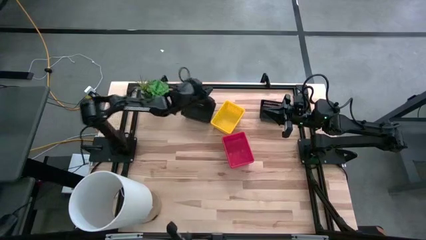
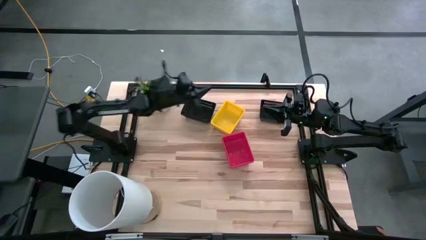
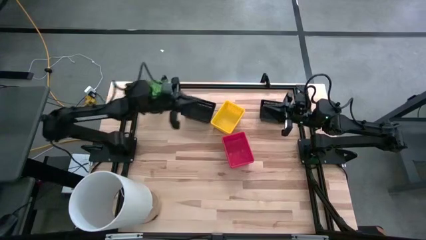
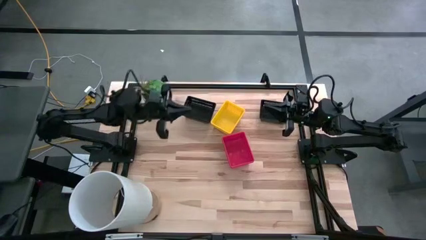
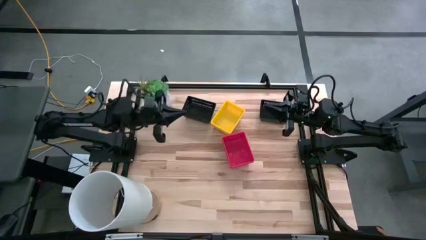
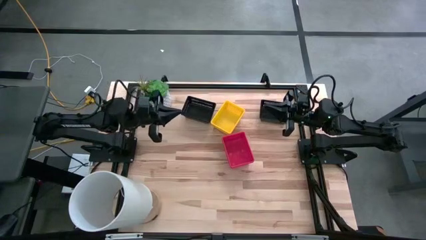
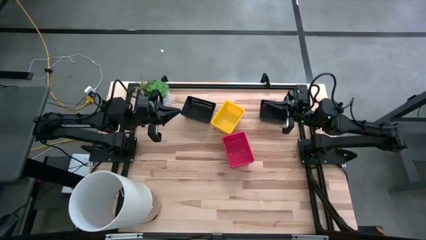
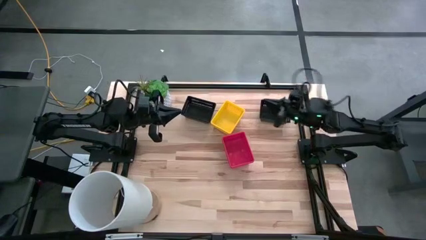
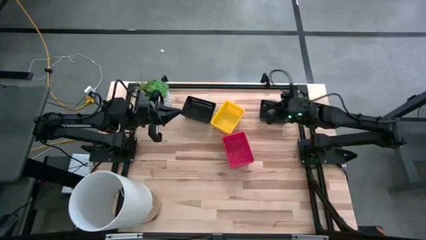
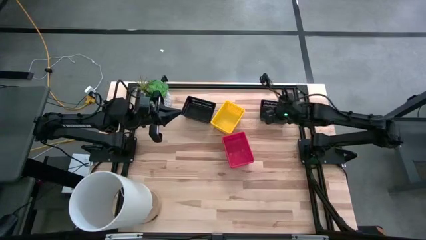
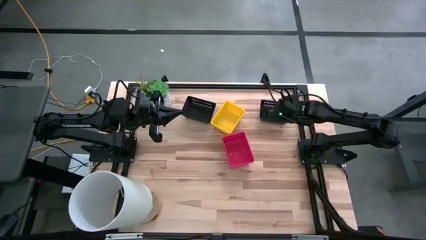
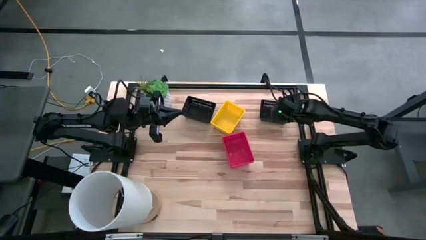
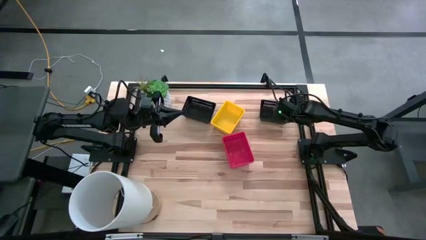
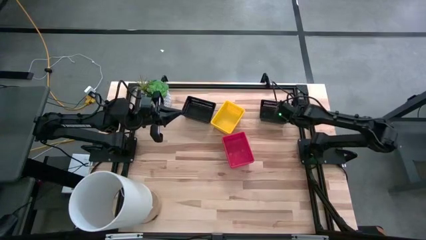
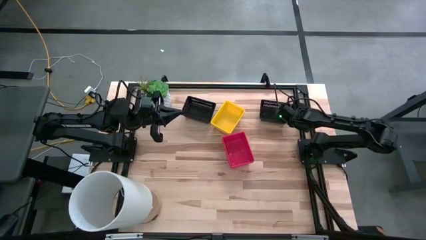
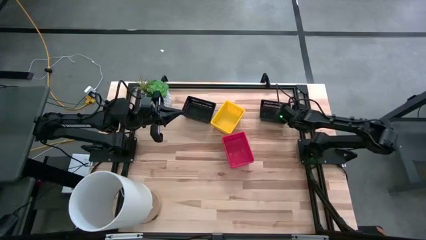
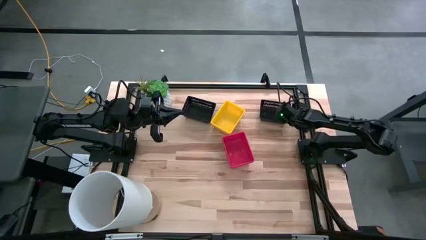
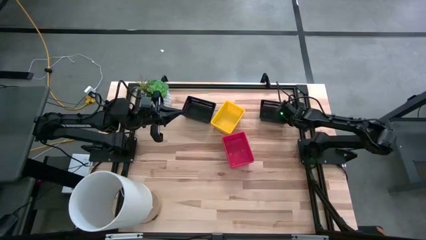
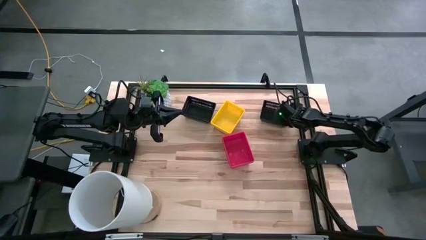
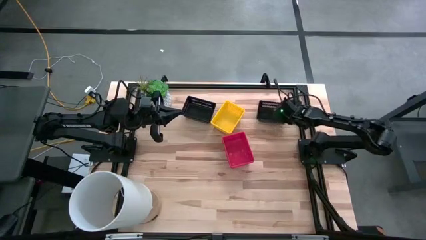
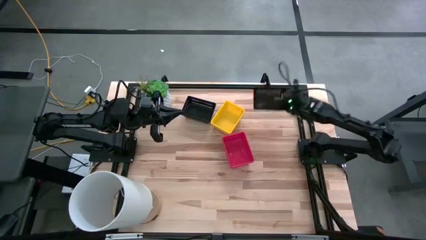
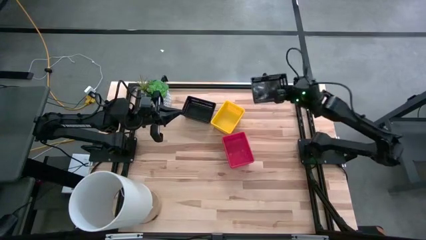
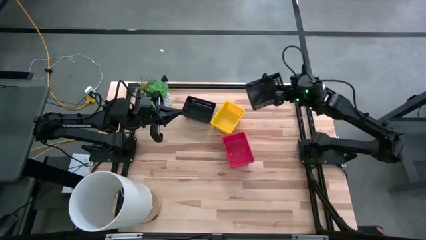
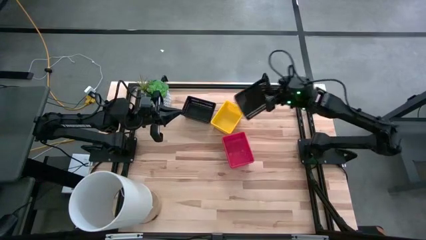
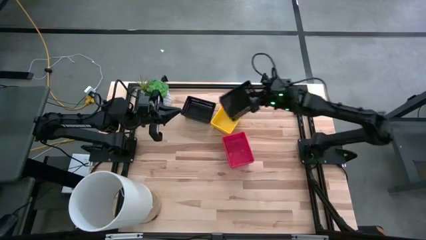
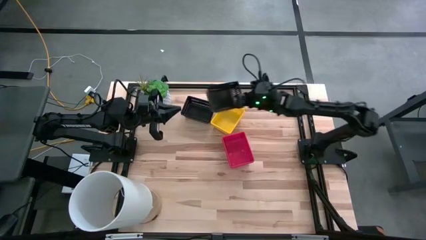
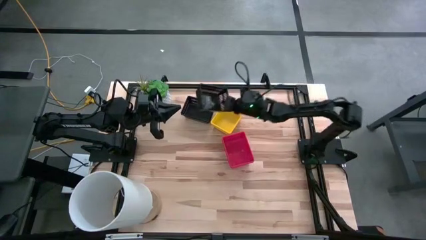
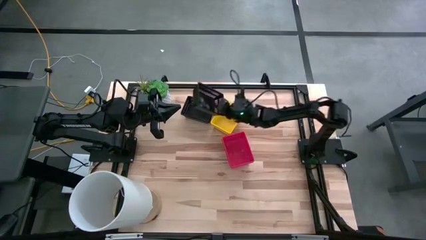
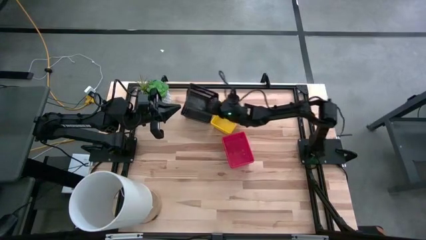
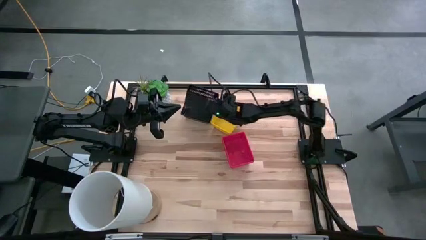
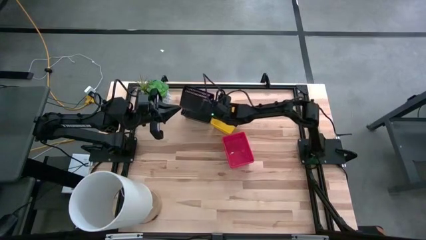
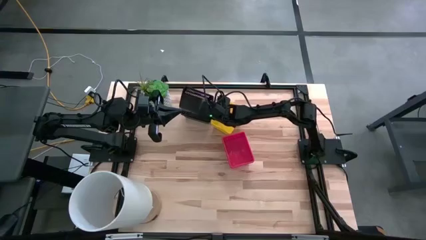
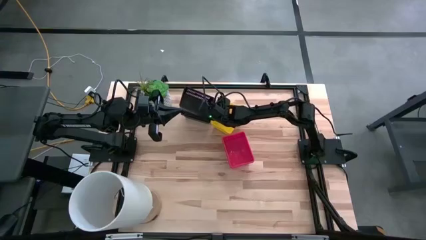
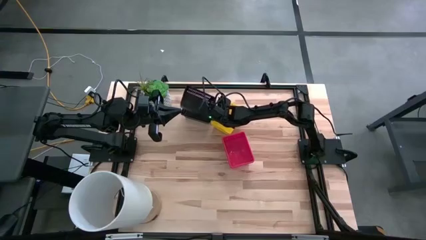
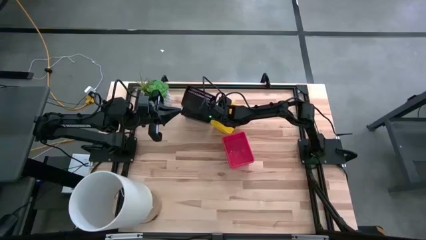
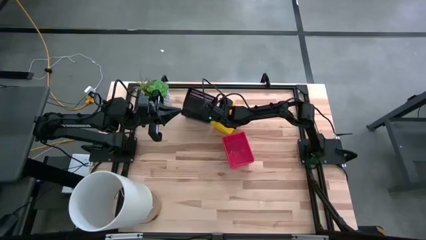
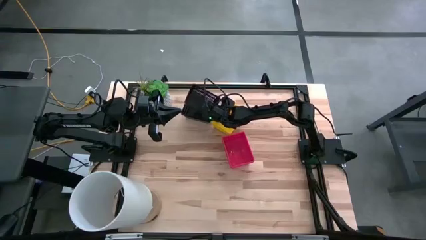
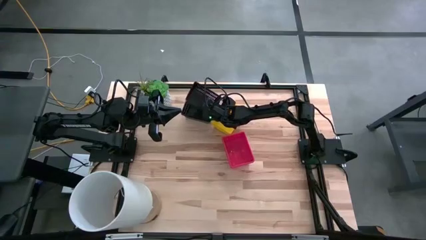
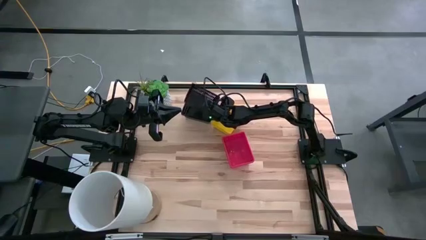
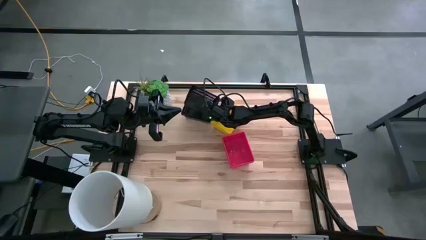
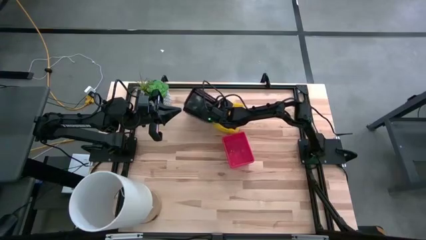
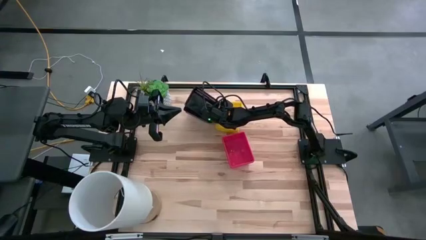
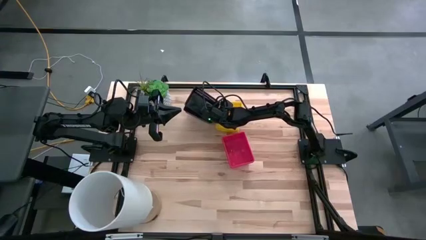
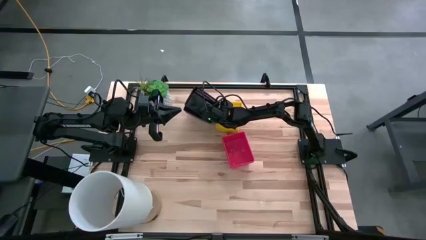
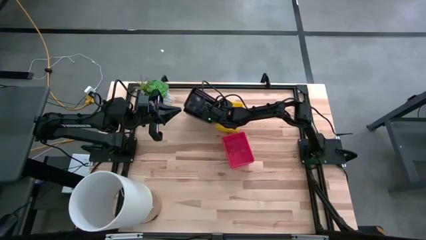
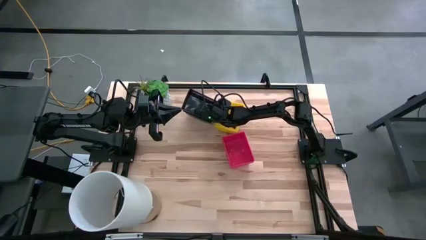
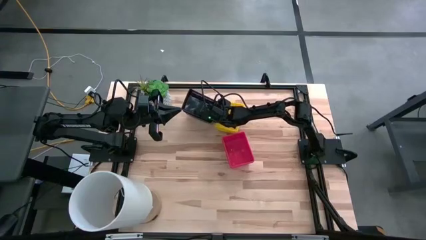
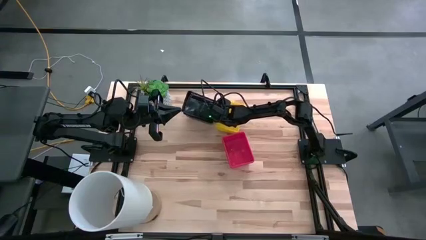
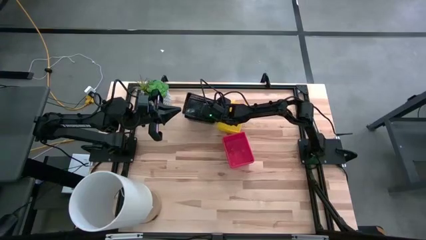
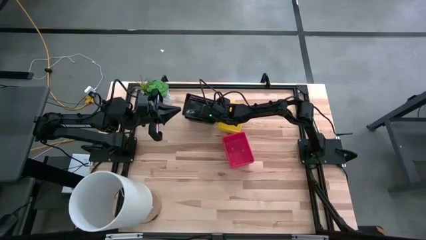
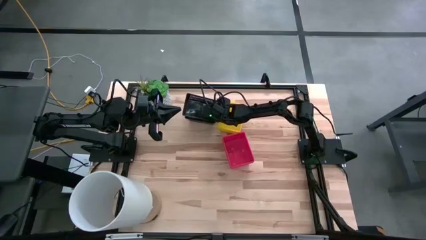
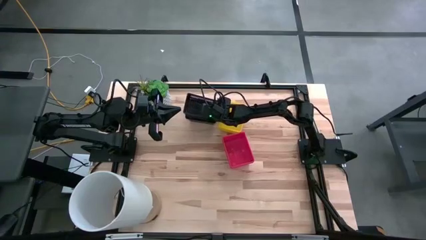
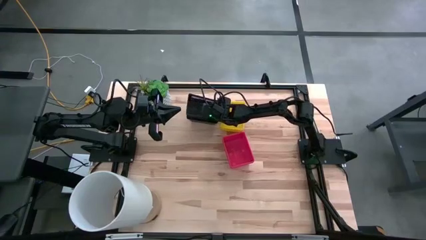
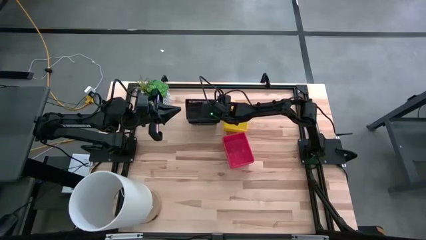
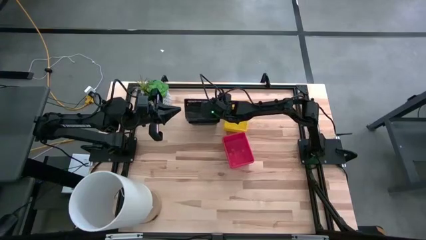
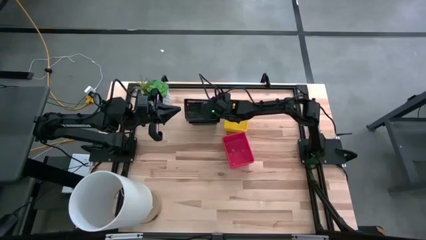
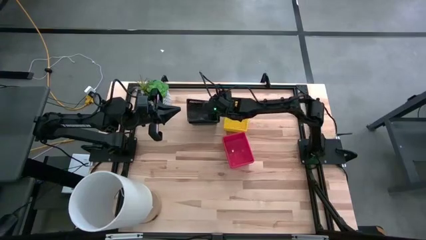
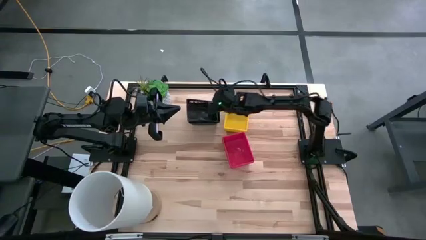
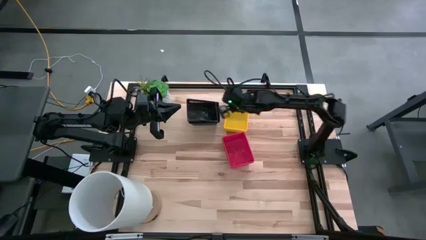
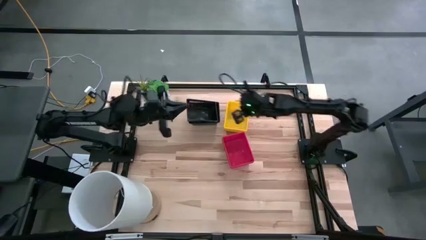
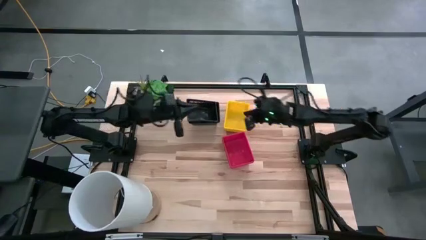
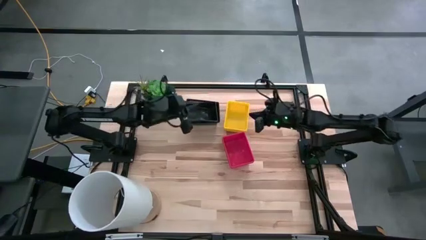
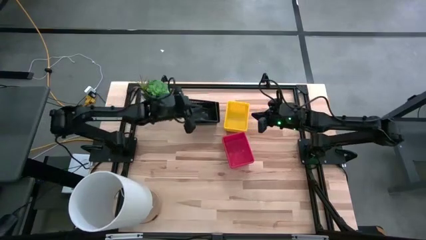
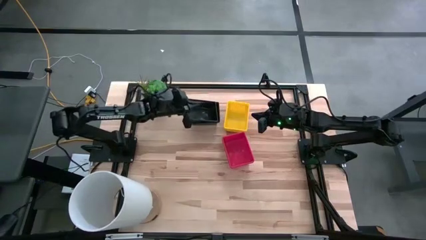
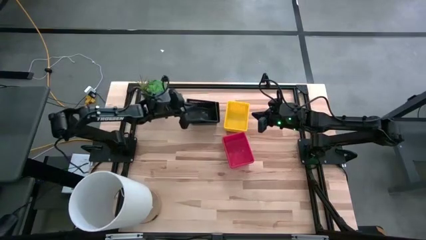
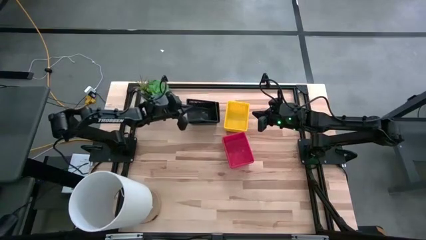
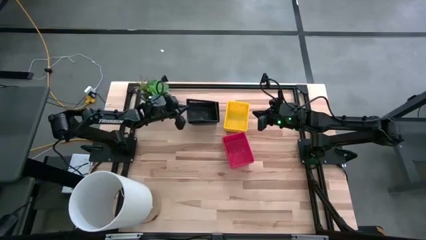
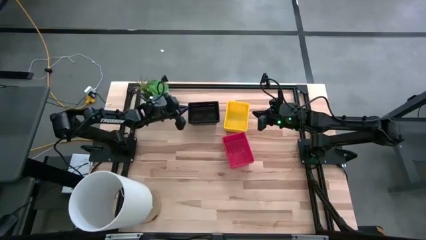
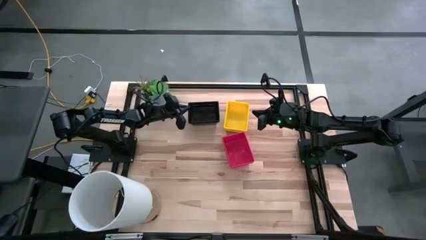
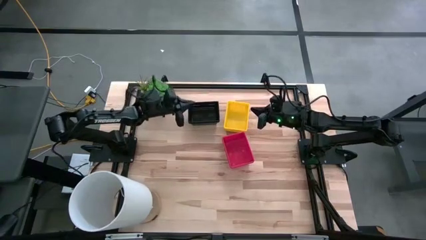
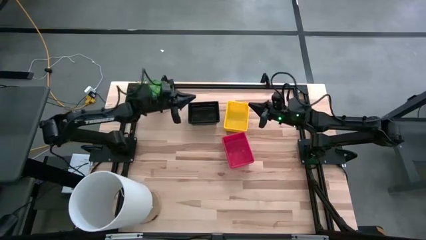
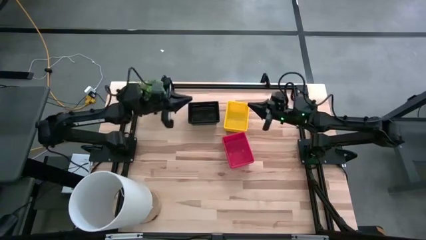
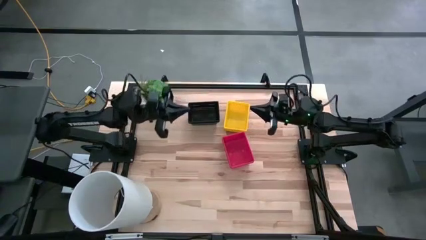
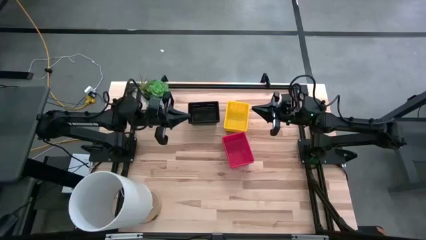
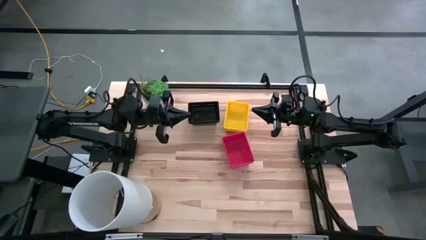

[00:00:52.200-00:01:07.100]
Stack the black bin on the black bin

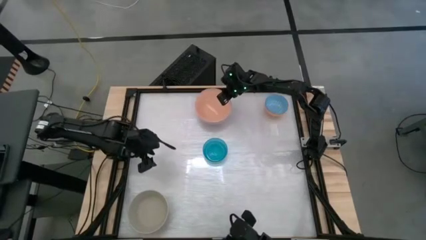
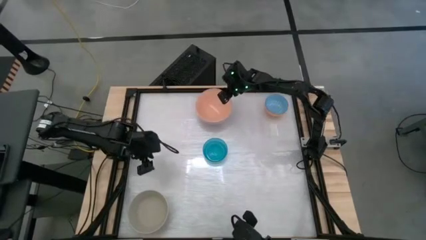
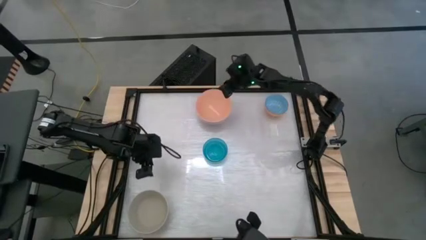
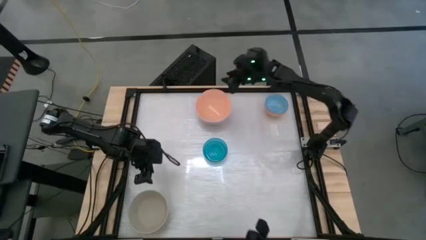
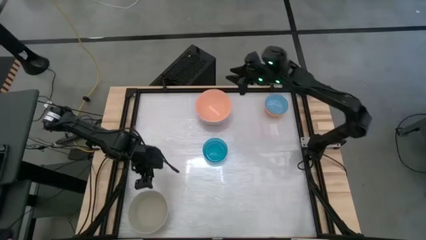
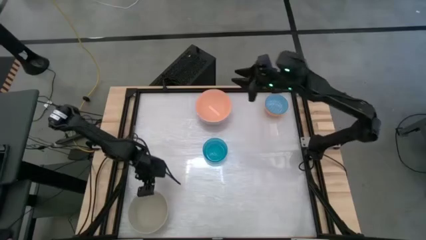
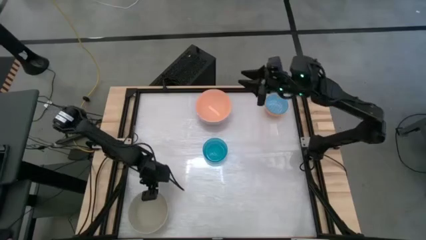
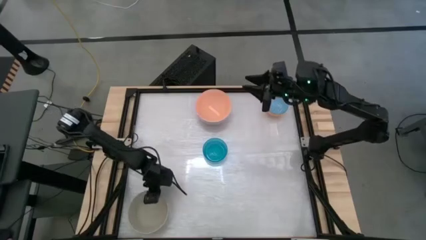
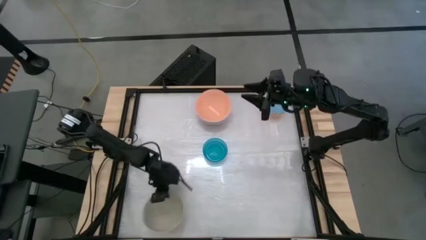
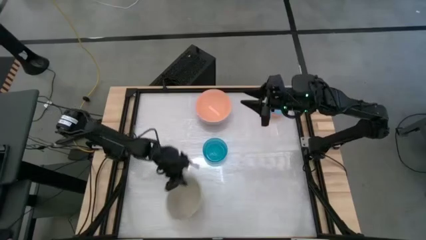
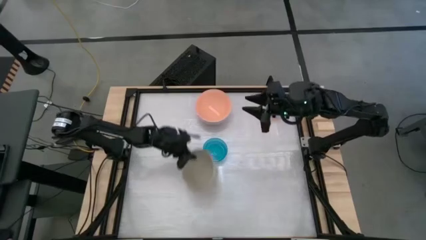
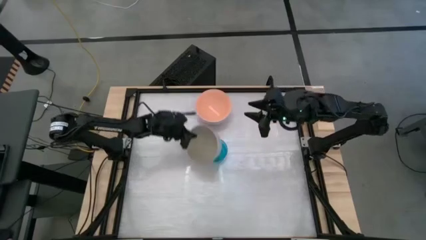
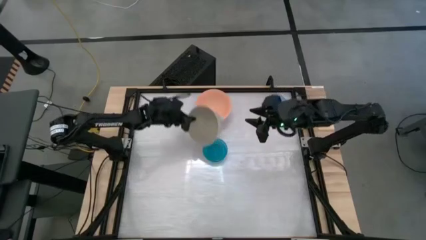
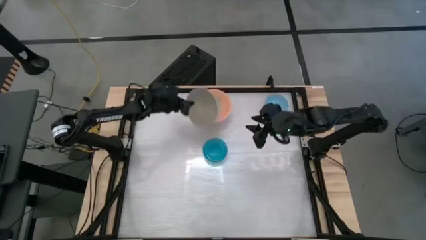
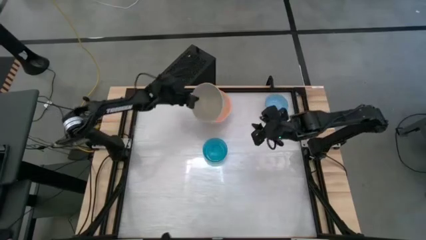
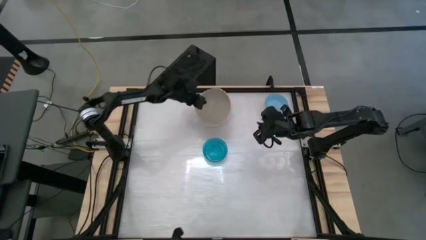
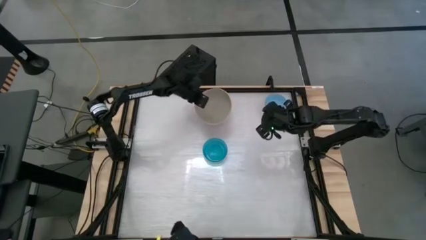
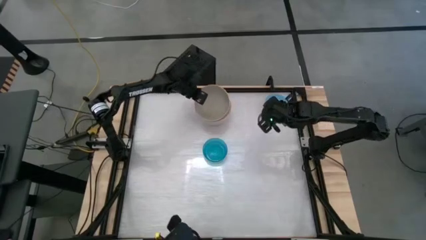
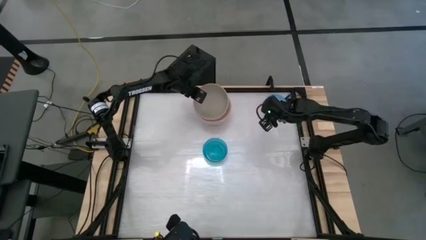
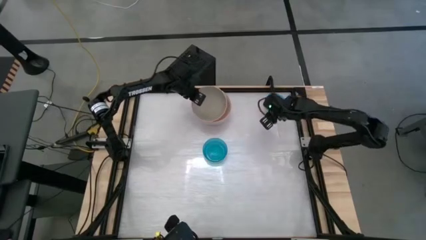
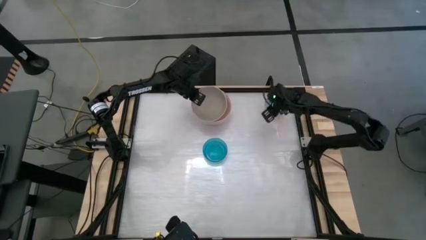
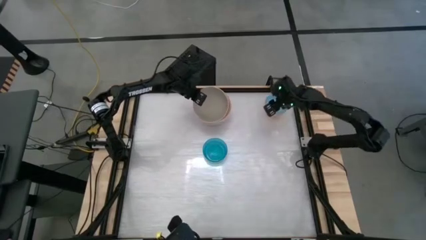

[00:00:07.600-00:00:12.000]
Stack the beige bowl on top of the pink bowl
